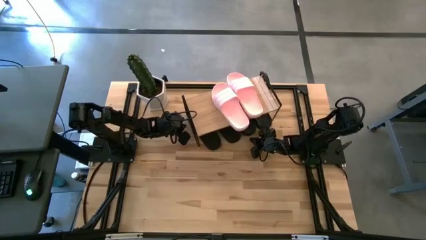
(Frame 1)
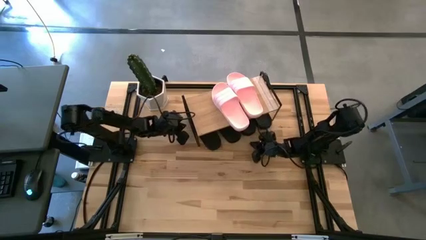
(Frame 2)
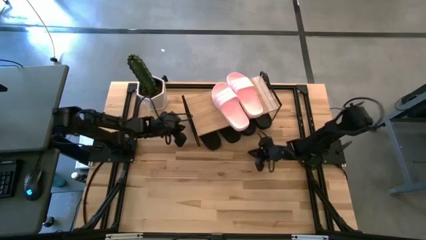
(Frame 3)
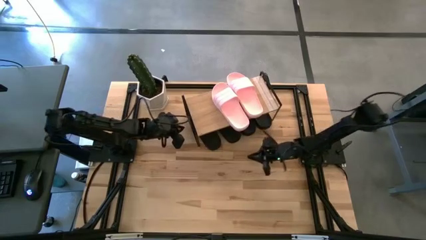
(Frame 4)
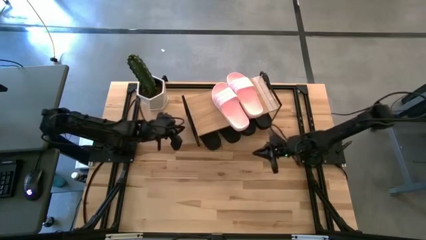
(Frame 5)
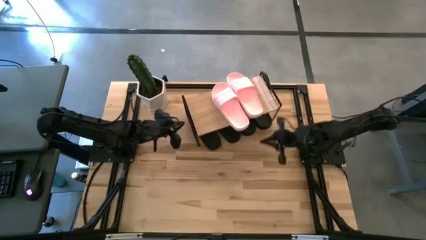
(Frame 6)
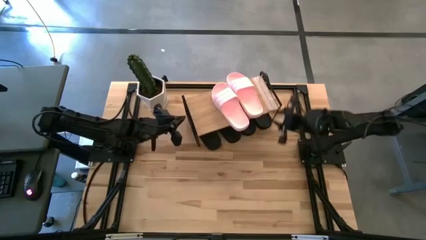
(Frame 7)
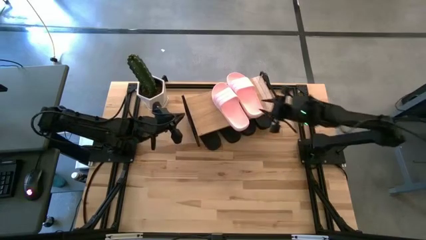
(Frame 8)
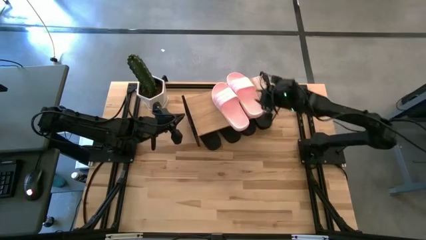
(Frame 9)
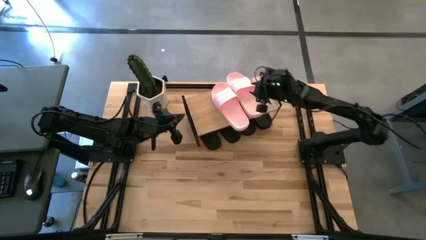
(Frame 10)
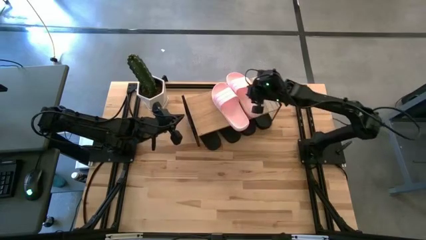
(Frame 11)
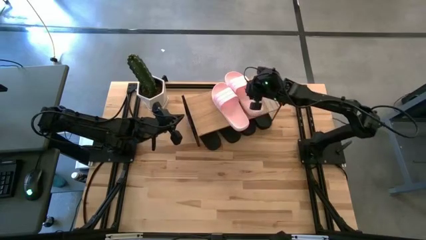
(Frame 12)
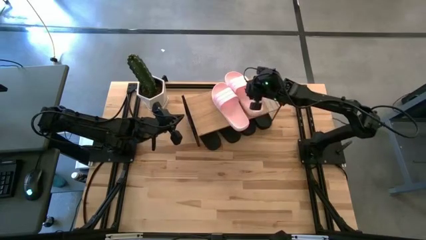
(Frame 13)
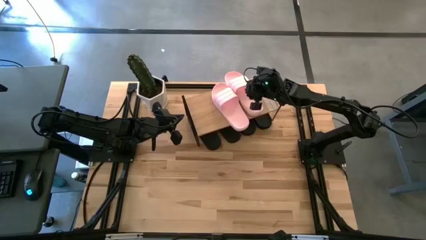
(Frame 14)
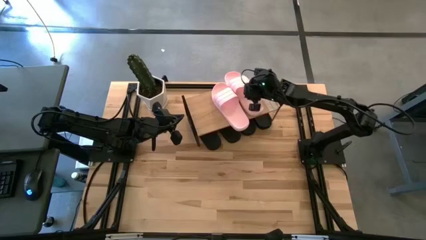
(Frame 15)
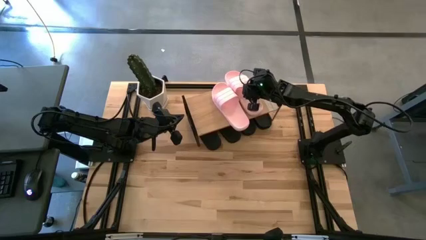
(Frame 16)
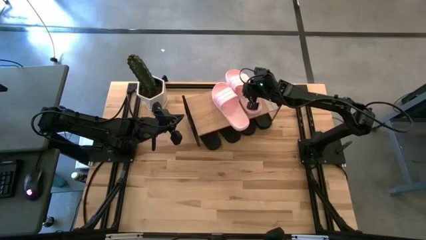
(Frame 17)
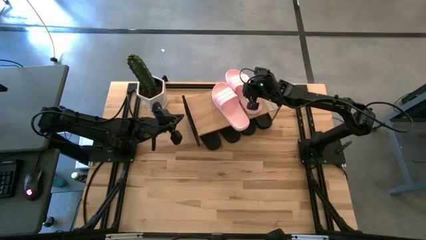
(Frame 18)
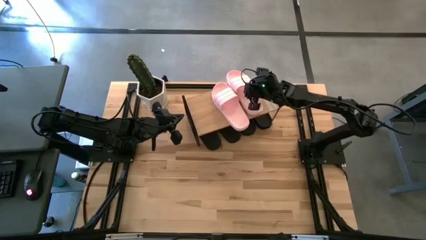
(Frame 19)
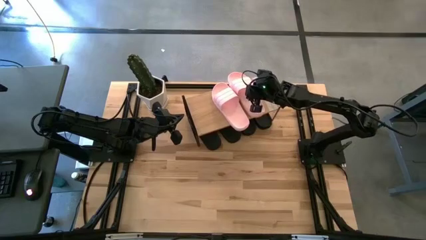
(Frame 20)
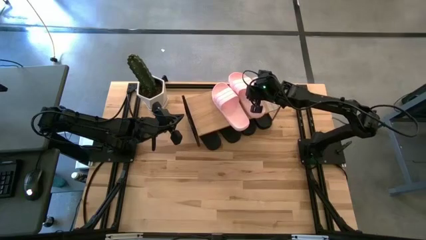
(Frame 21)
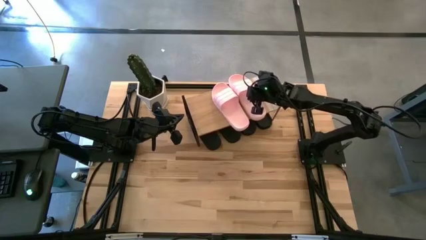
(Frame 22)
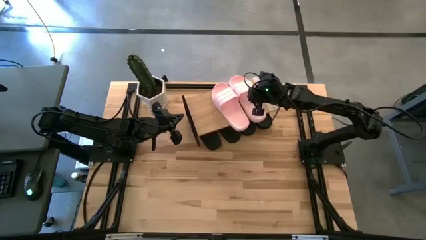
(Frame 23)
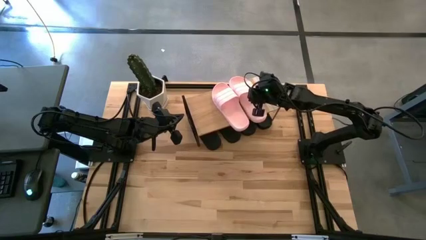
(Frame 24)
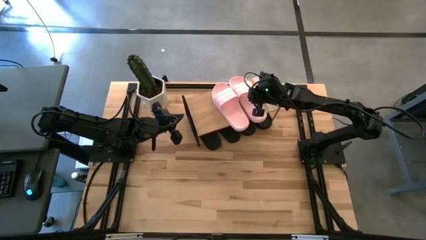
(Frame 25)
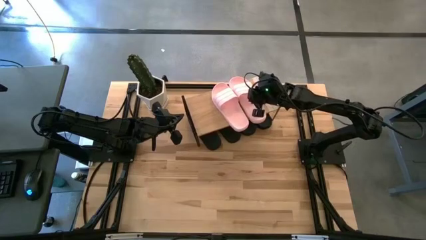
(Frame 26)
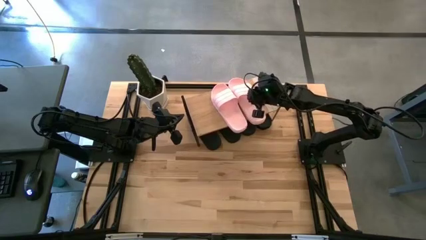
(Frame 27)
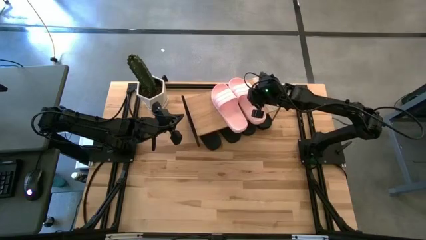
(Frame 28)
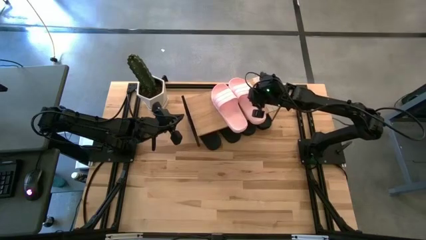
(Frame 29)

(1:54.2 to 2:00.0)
Task: Pick and place slides into the shelf
Adjust the pink slide on the shelf

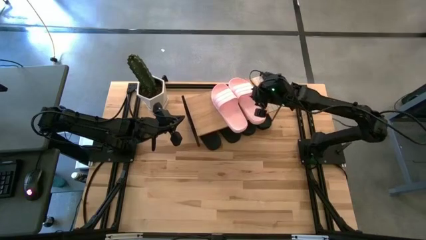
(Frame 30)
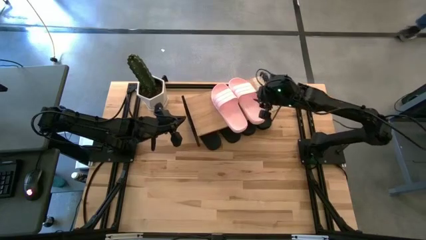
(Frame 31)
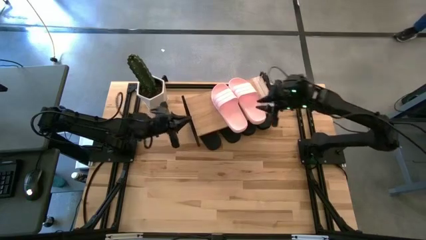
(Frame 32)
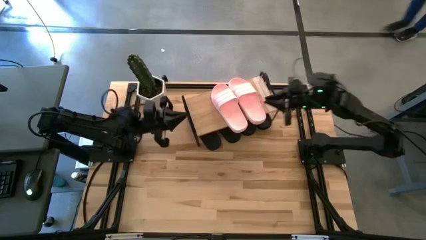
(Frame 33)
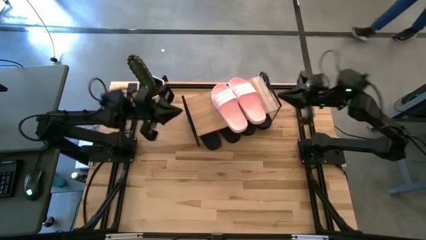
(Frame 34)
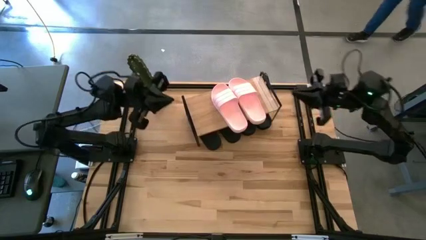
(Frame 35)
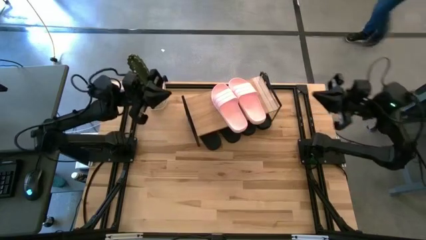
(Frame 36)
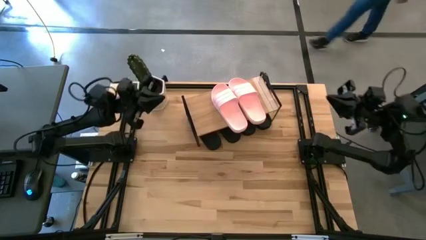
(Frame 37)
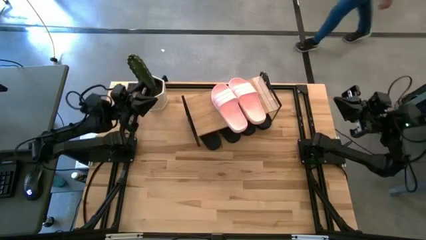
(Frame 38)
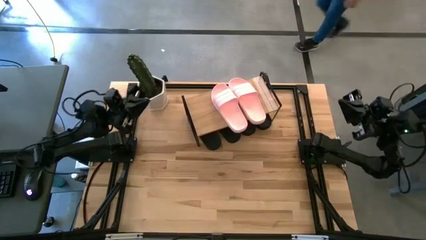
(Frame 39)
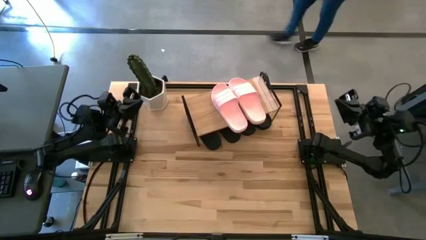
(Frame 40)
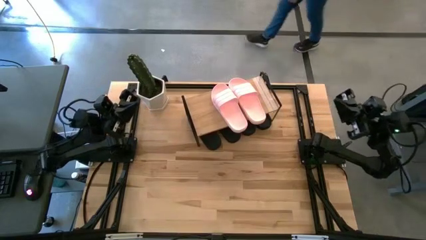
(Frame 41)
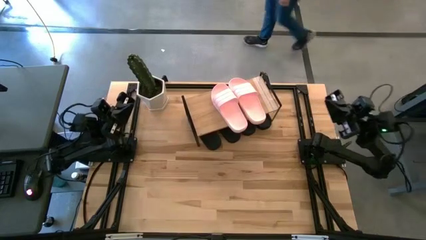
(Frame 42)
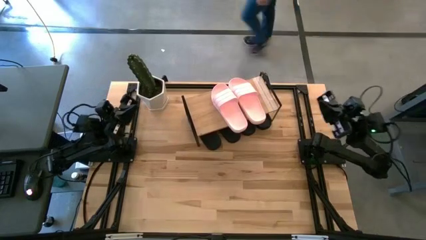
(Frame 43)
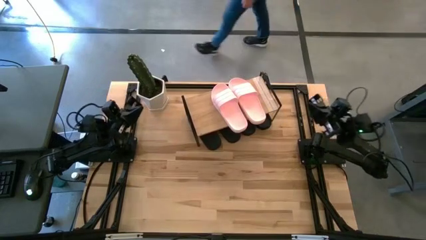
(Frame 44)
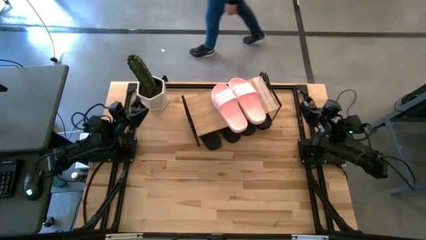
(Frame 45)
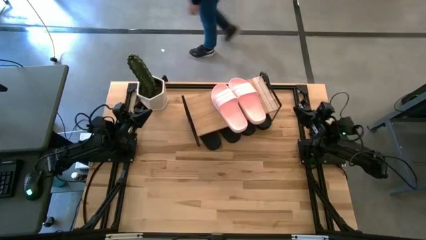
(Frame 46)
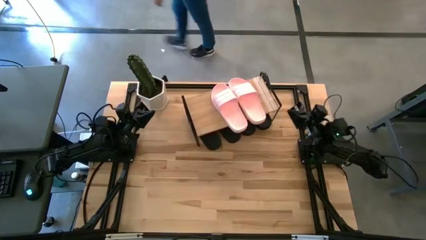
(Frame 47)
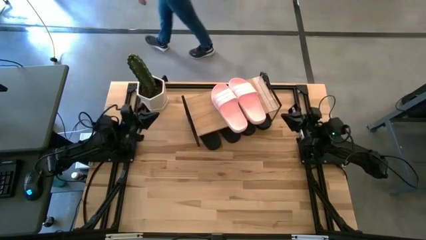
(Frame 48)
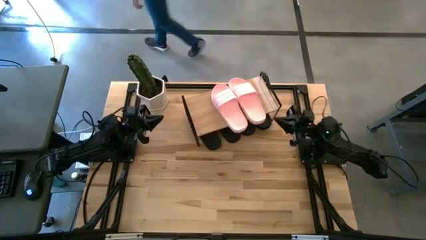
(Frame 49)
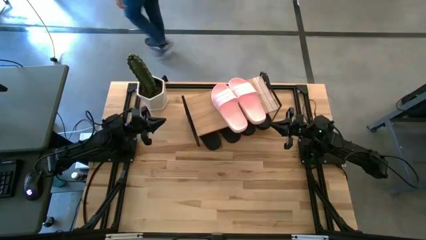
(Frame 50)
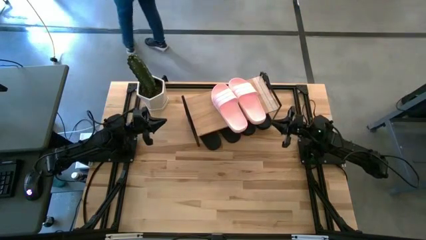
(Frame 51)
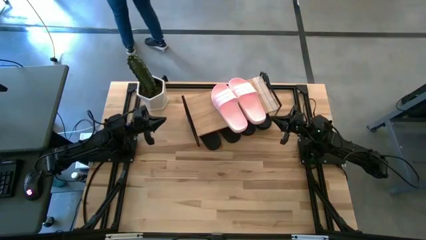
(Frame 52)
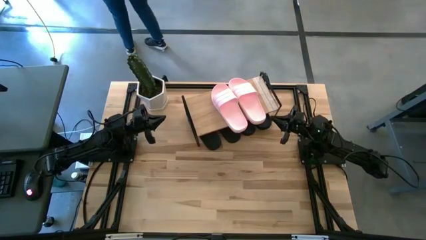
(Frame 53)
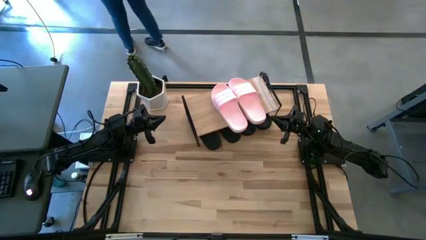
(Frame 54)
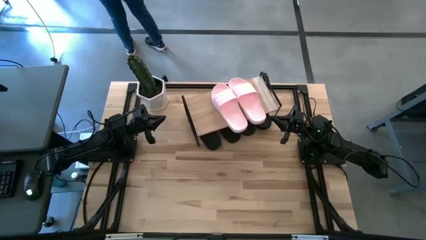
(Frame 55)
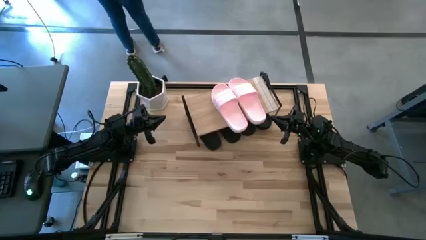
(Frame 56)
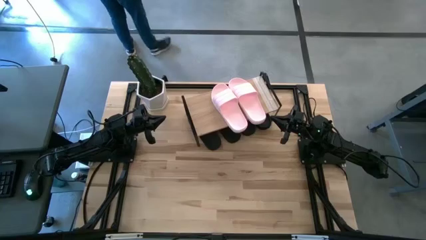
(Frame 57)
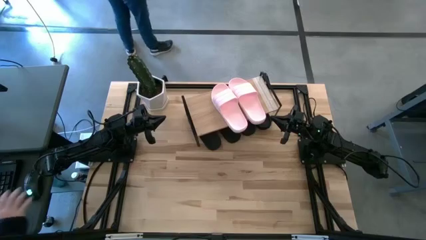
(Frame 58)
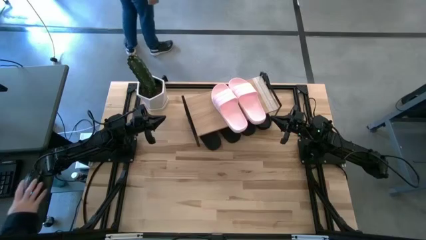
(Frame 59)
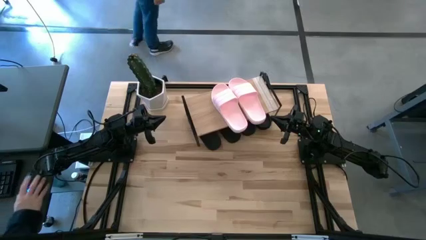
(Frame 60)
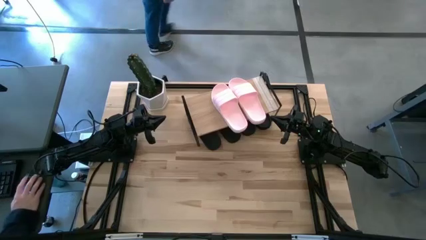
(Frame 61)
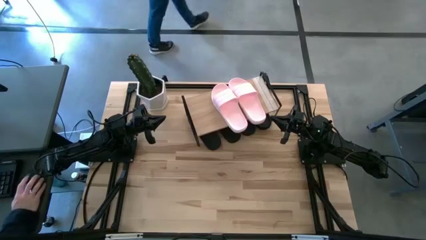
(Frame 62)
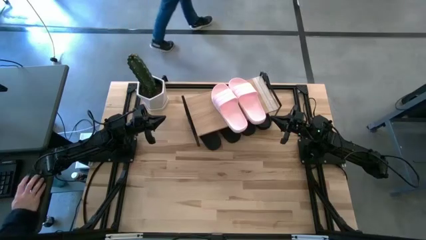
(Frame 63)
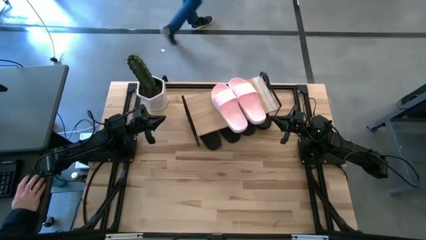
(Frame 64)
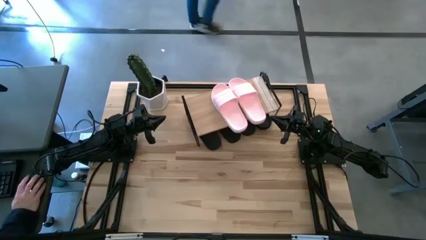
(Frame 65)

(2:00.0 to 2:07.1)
Return to Home Position

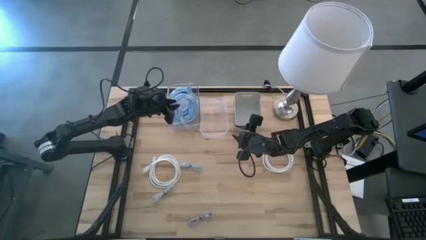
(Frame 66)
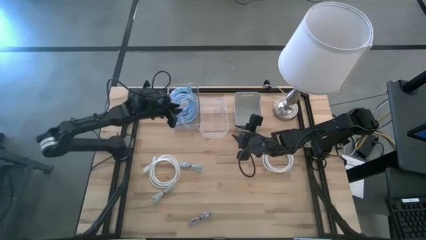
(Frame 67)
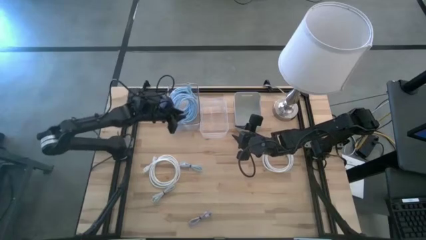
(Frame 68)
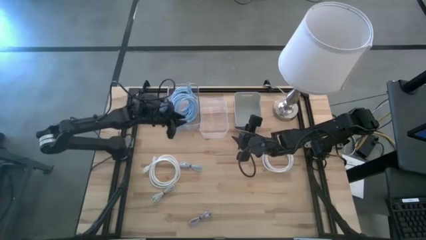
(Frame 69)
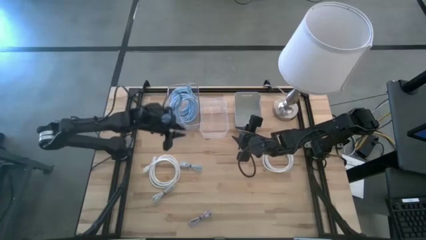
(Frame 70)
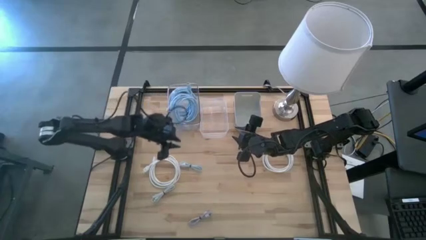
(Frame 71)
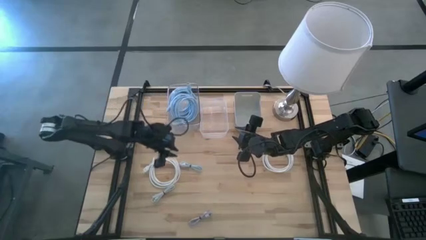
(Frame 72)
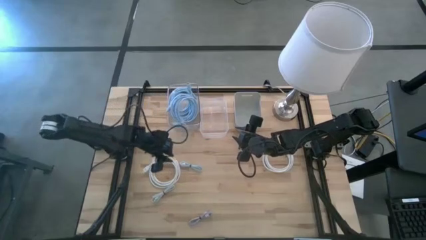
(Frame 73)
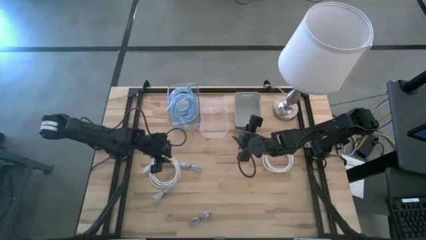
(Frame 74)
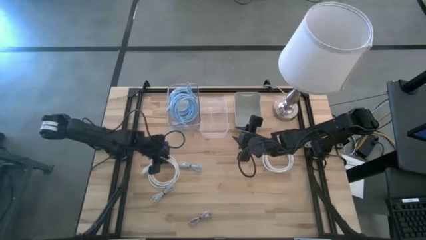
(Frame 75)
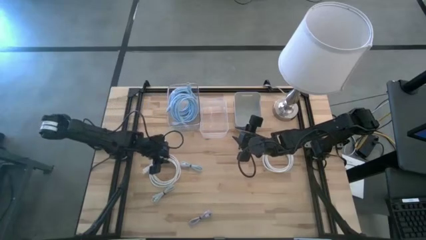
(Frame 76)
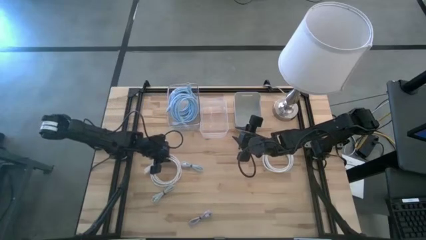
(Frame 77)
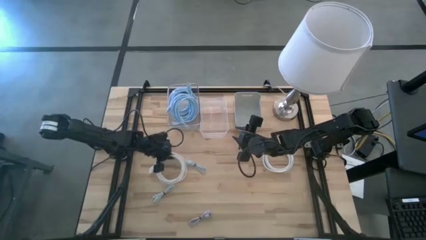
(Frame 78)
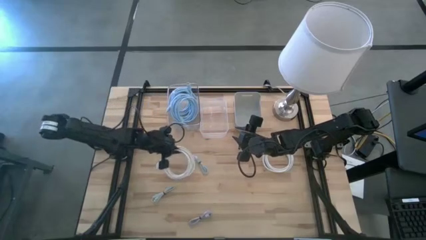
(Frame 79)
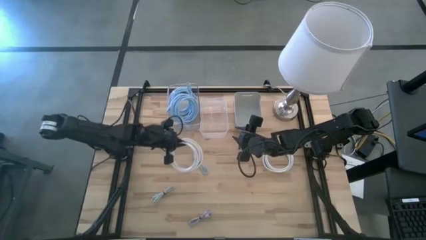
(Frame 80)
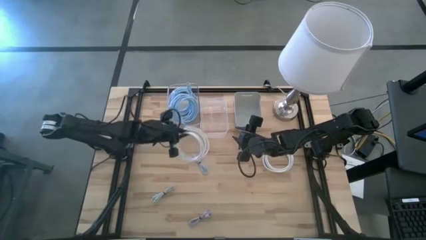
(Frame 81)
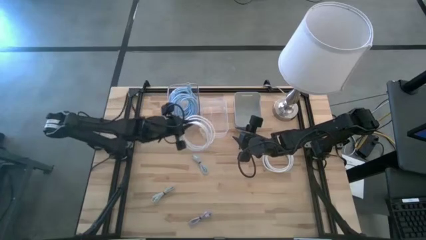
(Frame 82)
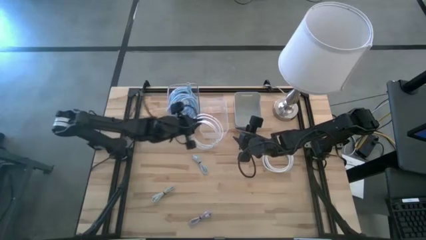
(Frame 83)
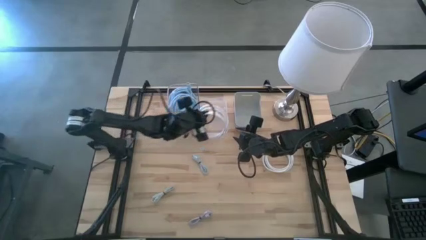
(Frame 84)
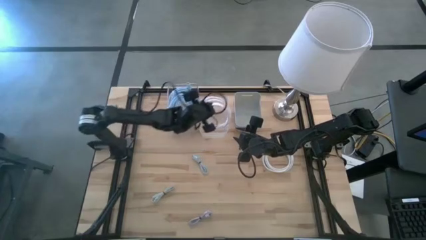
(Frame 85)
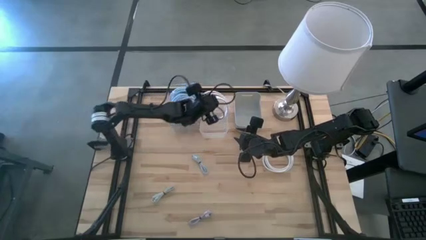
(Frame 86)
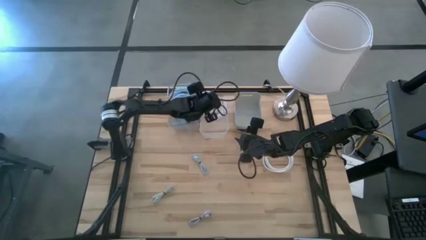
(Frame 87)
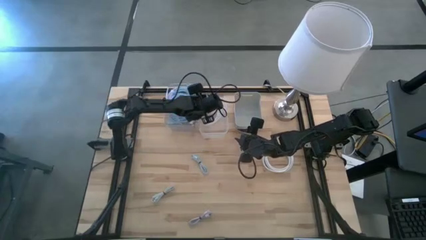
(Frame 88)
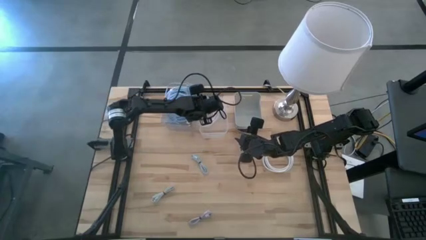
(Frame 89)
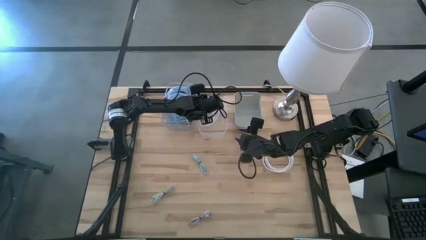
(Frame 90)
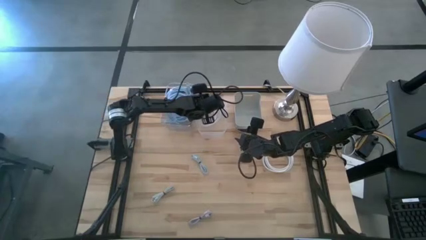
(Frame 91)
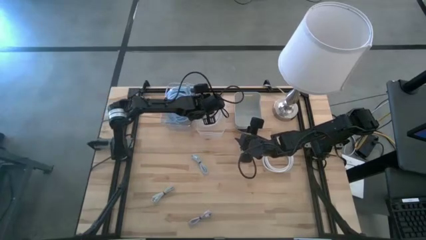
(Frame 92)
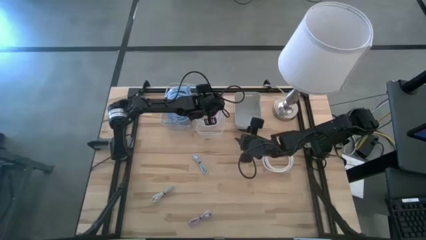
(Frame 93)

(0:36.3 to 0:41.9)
Task: Pick & Place USB Port
Put the left white hdmi cable into the right transparent bin
